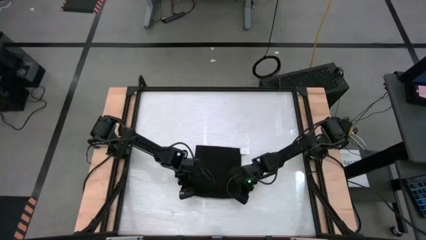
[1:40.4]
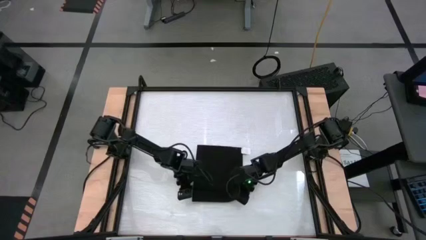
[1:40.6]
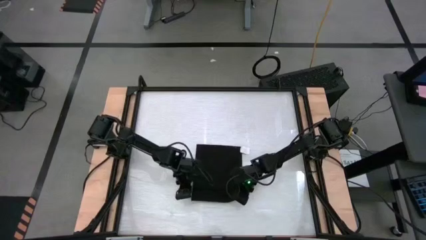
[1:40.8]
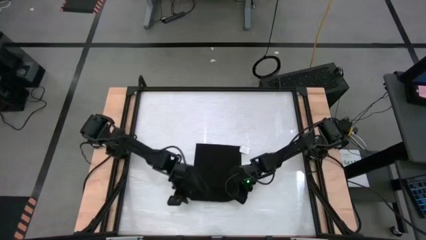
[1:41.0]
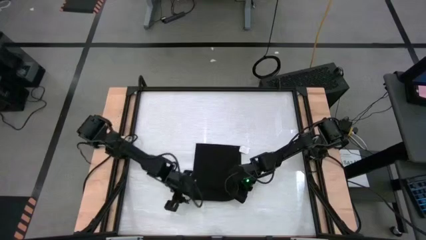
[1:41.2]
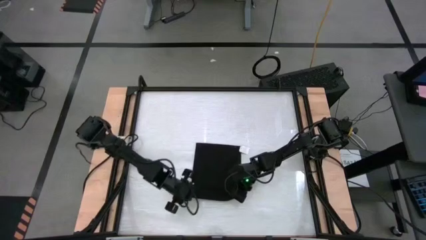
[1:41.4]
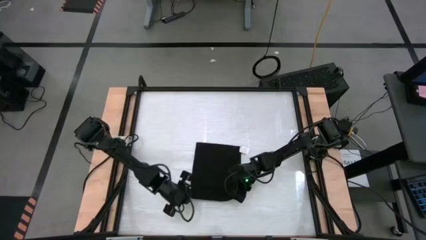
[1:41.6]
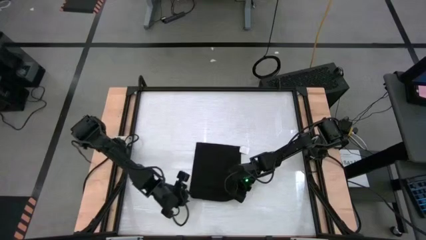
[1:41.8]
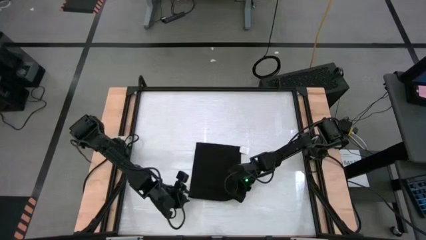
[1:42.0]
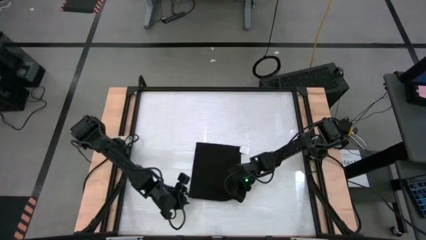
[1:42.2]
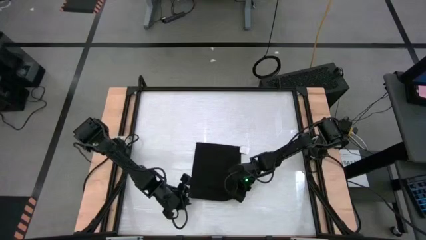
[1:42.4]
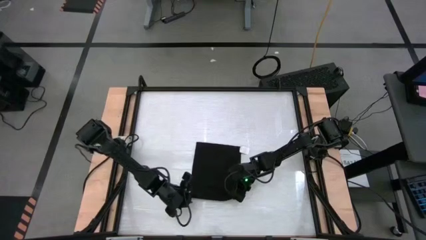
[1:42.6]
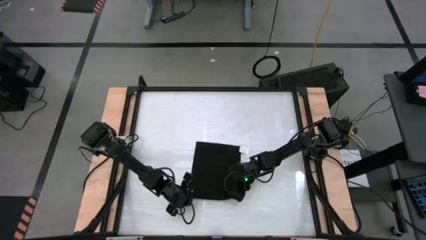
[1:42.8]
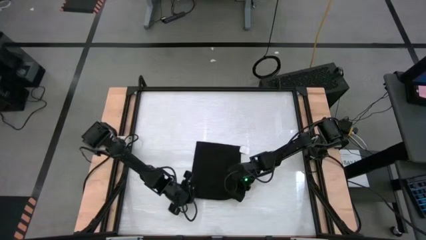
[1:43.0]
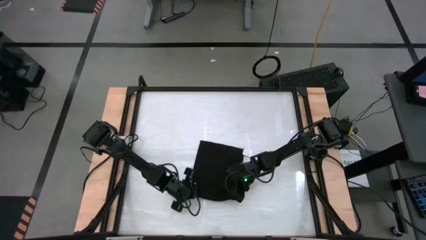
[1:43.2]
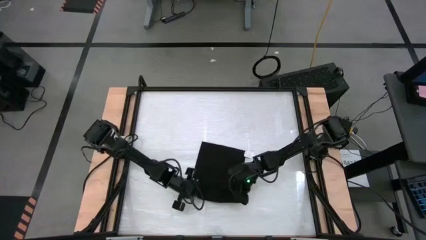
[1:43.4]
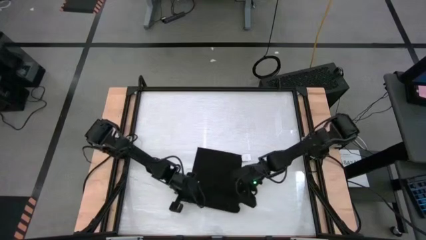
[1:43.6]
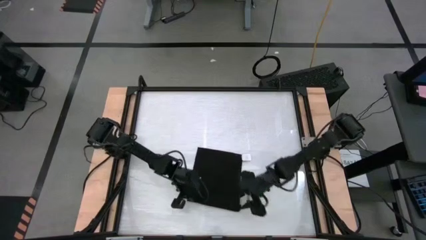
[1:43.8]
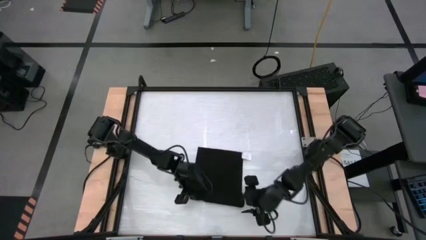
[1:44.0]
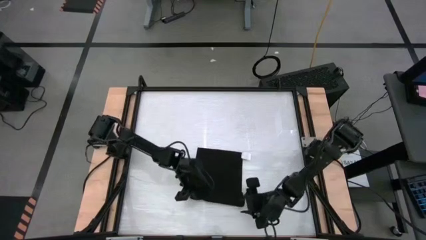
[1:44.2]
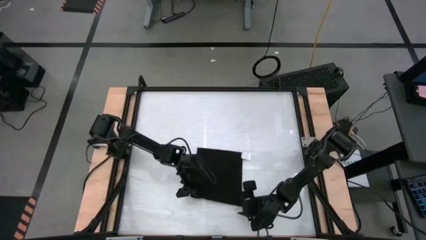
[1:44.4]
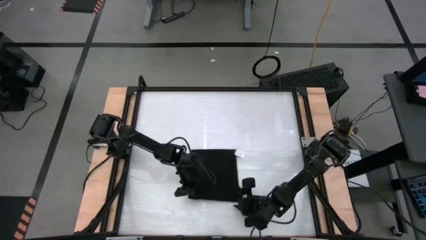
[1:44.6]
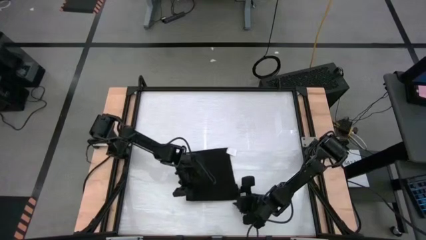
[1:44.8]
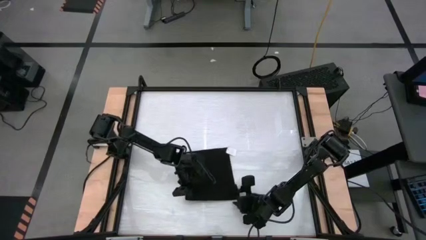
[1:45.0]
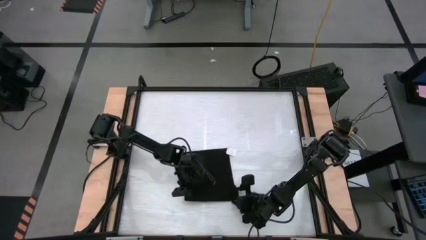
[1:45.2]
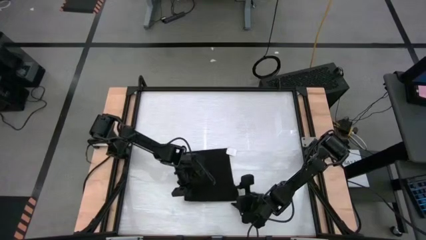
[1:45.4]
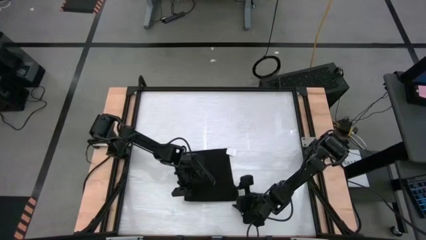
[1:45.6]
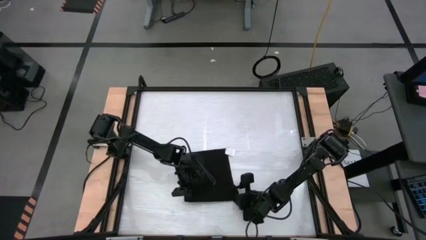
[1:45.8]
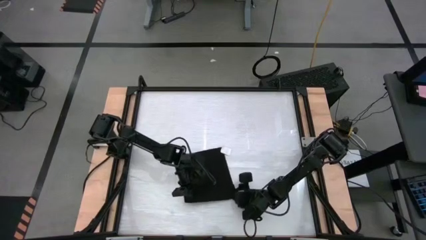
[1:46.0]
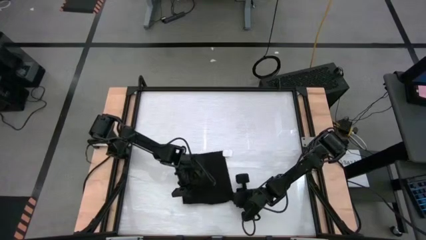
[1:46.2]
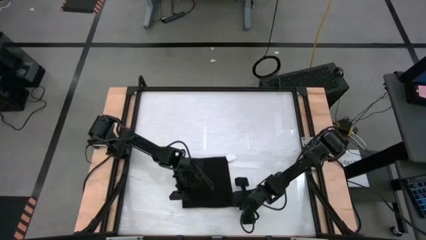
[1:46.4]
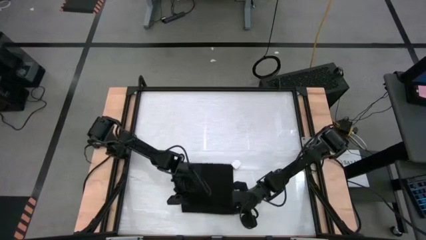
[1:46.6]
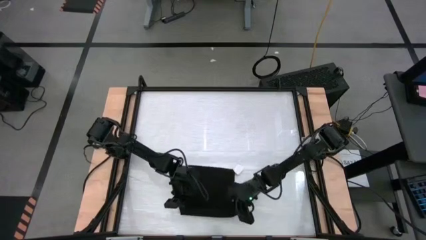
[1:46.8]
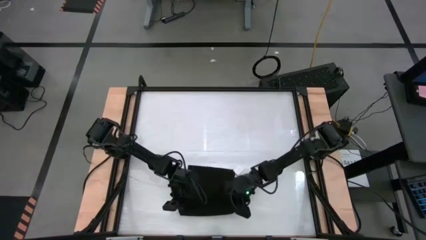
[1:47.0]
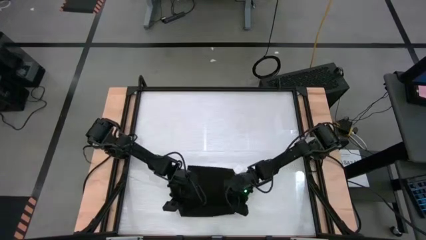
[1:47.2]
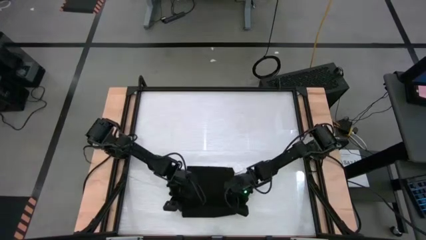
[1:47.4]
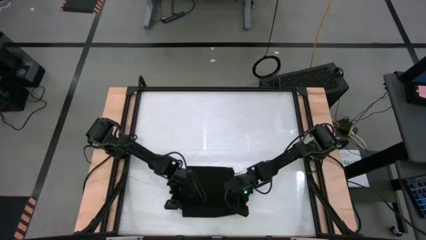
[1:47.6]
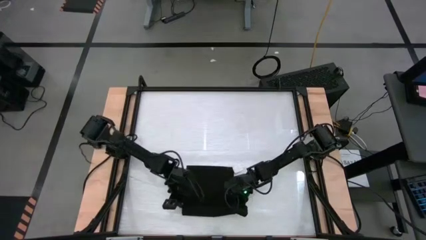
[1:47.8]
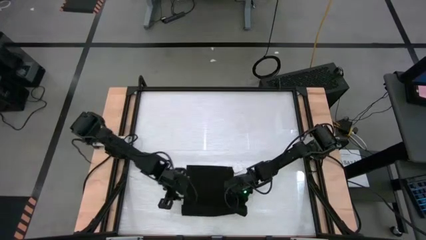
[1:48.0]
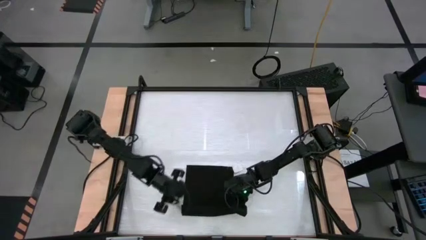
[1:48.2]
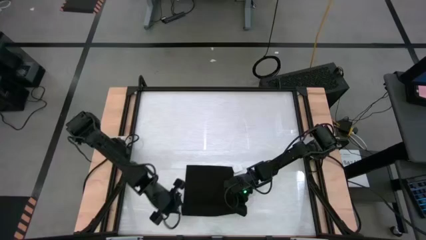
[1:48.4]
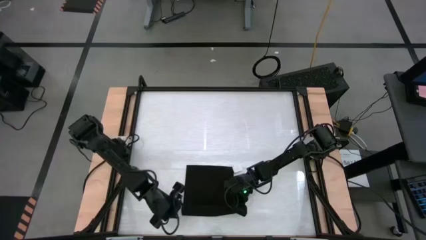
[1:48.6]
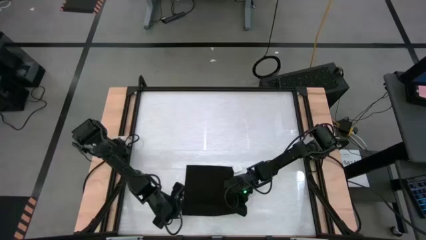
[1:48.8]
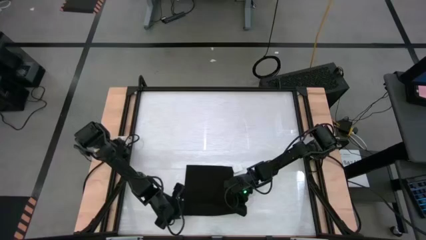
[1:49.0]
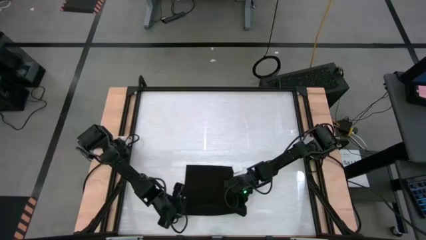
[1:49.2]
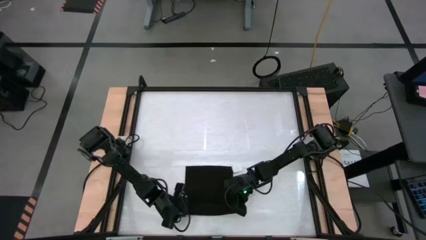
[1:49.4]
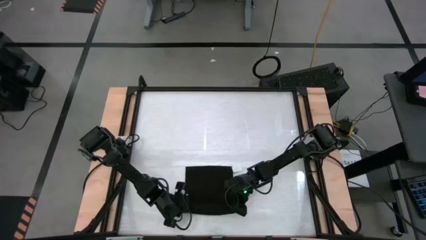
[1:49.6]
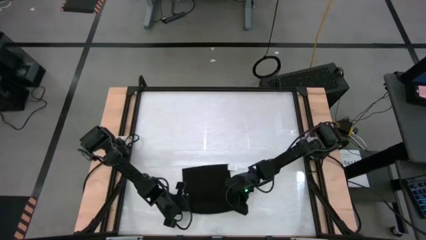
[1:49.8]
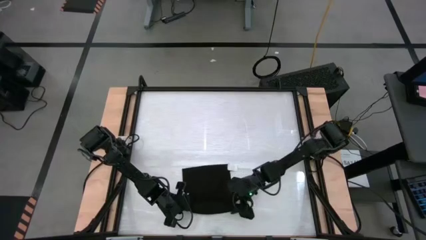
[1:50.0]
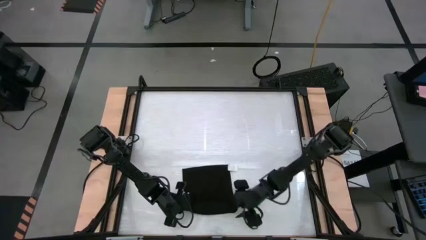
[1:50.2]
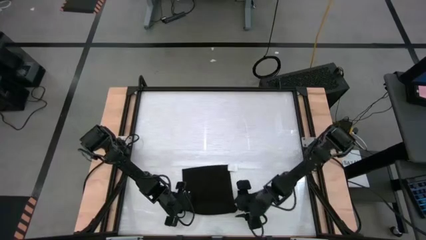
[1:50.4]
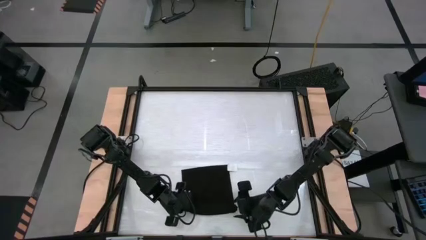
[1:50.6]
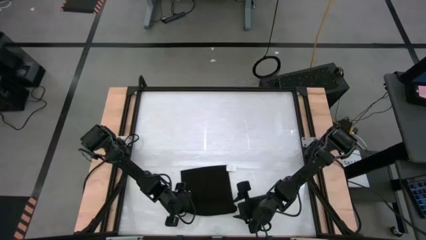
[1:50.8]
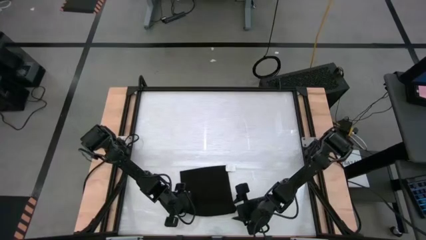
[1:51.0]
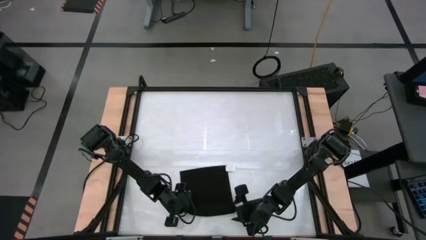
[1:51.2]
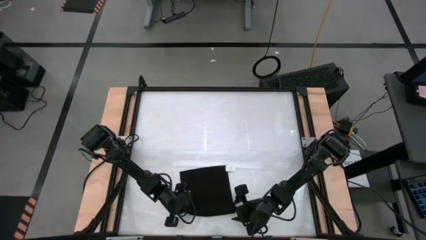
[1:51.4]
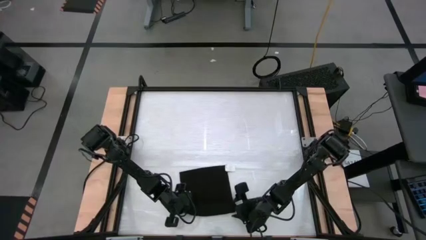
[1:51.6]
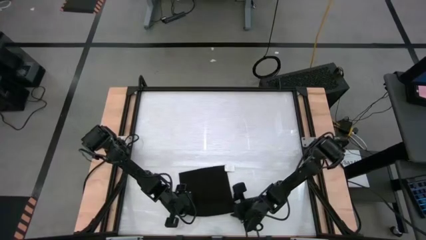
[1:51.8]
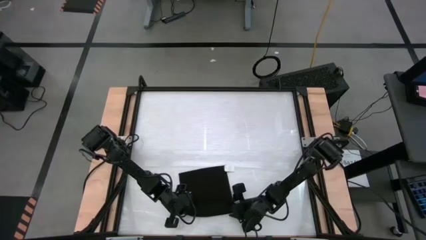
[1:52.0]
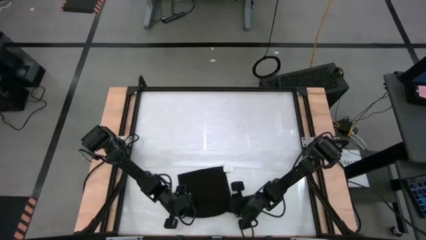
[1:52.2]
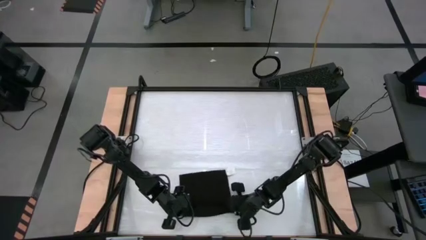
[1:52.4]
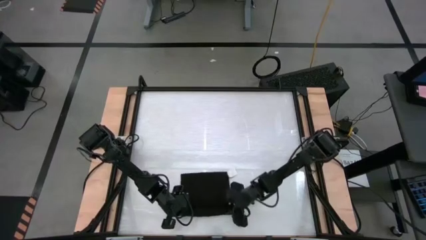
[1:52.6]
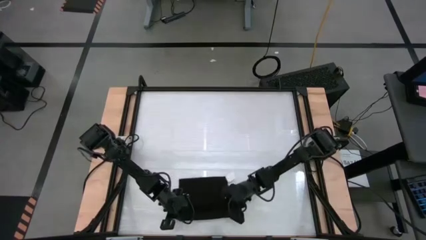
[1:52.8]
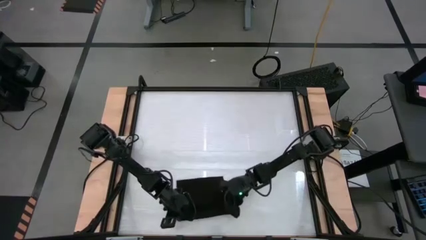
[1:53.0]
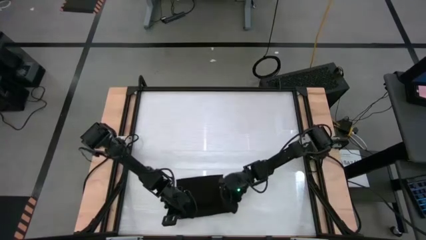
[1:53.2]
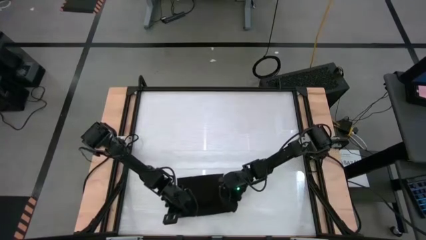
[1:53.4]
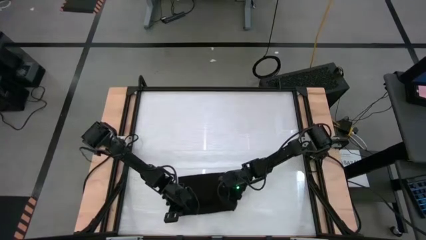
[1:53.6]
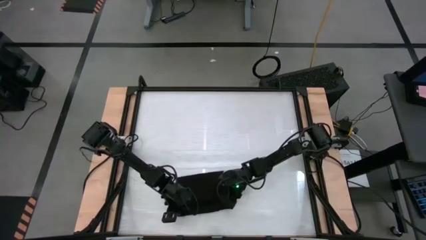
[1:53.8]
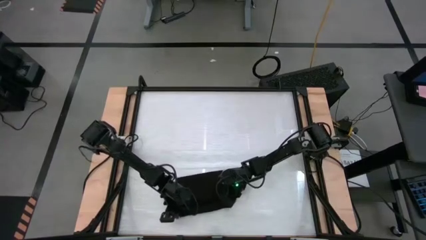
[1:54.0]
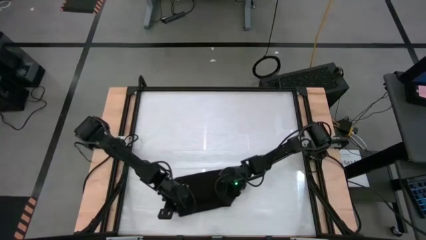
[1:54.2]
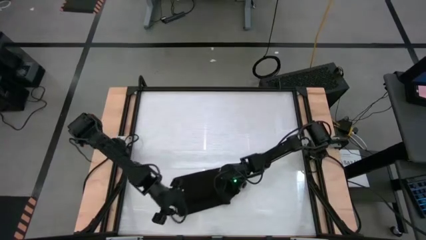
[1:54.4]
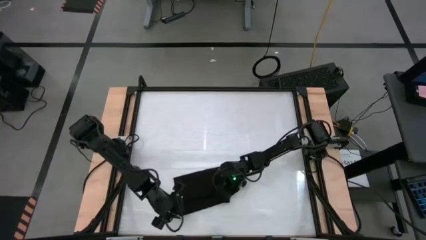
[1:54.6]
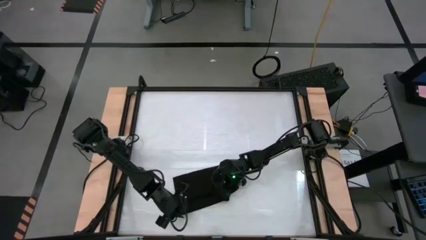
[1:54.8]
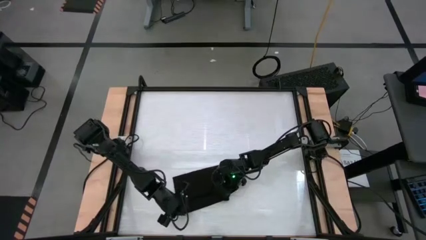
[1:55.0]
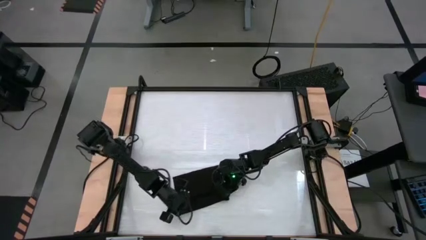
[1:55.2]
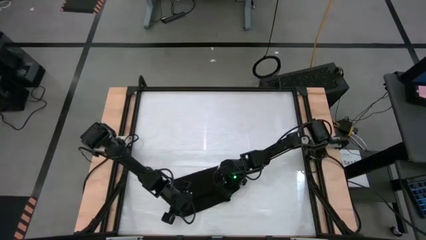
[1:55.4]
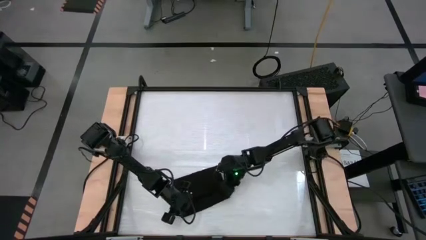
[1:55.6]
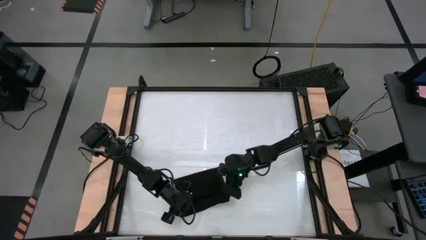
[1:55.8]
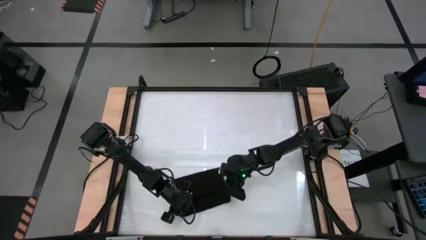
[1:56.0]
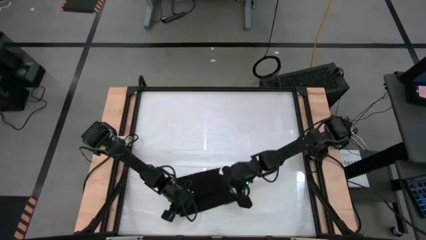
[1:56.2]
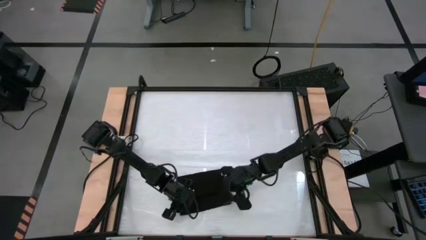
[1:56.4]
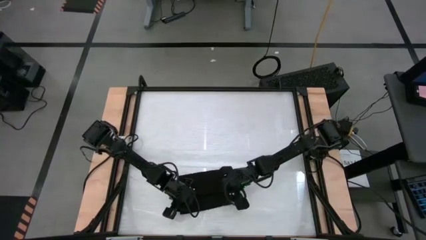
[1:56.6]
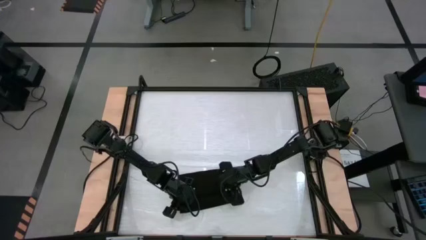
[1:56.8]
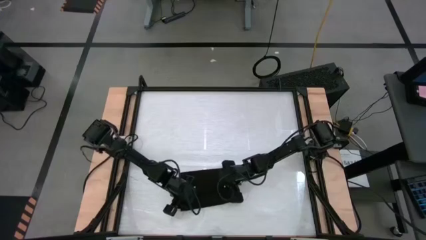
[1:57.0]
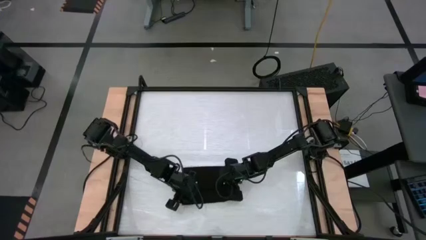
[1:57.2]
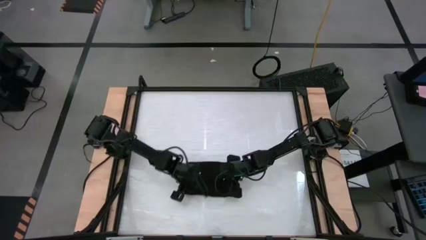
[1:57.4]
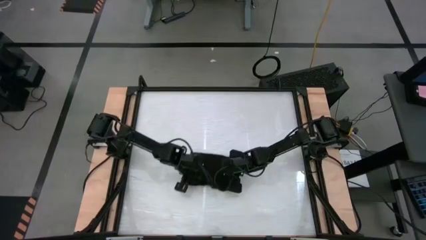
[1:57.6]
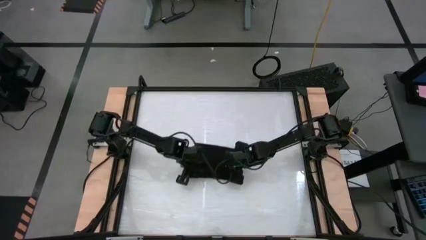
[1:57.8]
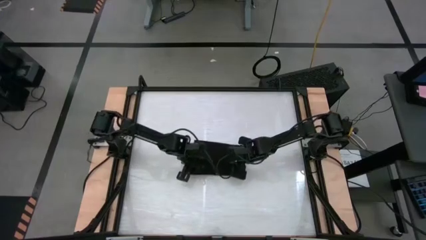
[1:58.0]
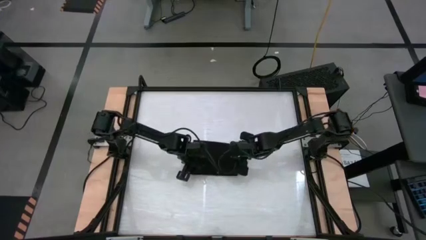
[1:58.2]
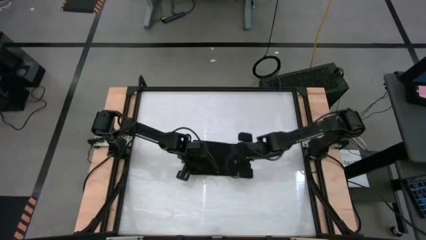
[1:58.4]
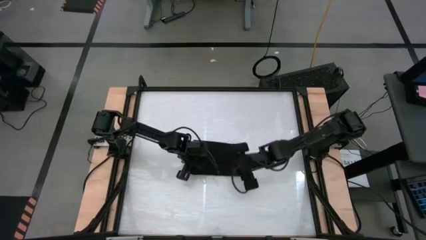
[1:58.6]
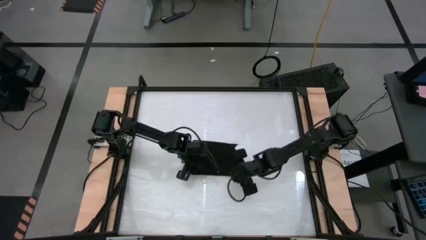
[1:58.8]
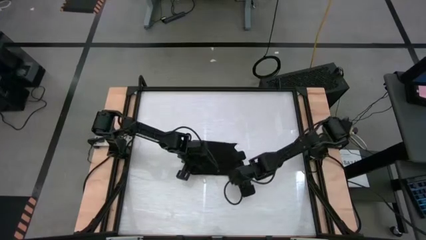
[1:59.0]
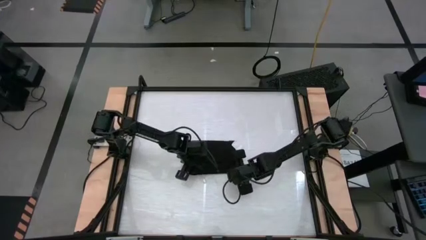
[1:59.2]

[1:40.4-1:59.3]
Task: Roll napkin
Roll the black napkin
